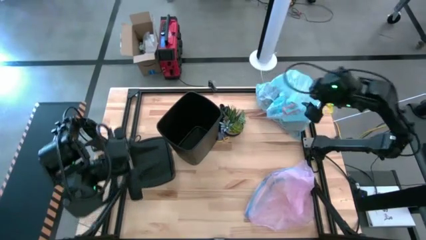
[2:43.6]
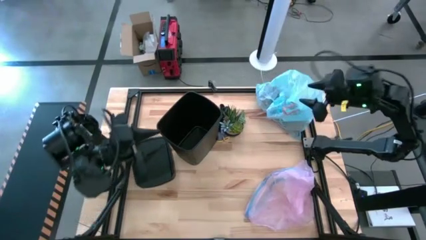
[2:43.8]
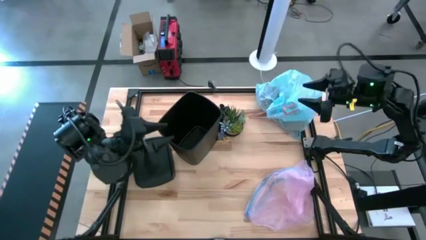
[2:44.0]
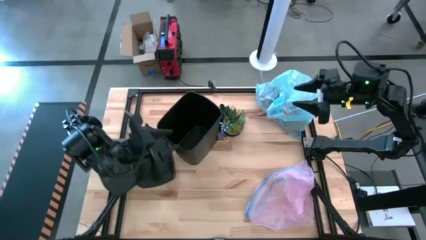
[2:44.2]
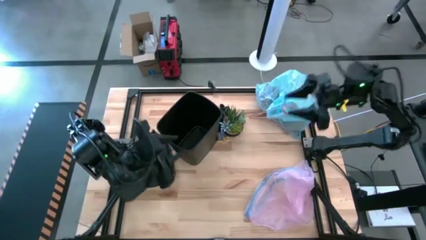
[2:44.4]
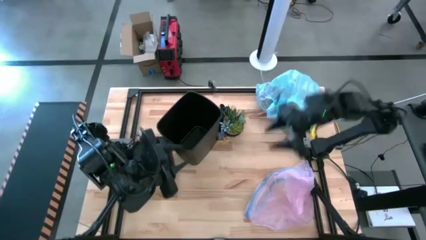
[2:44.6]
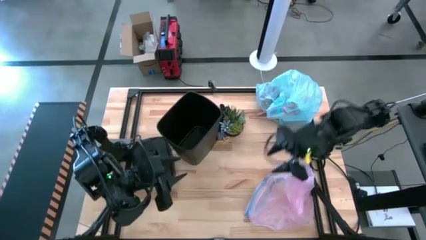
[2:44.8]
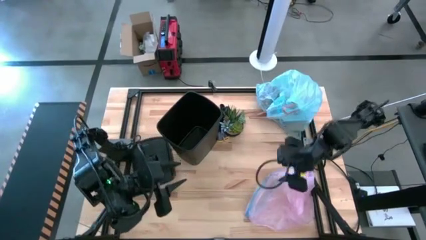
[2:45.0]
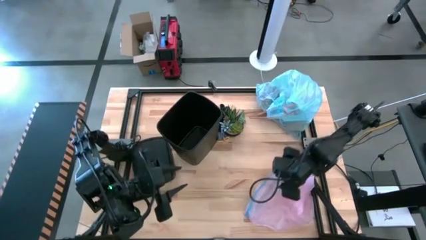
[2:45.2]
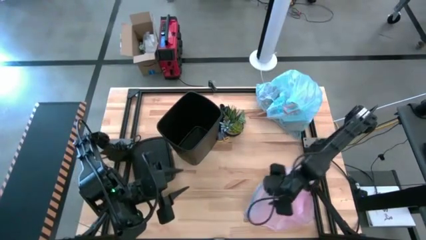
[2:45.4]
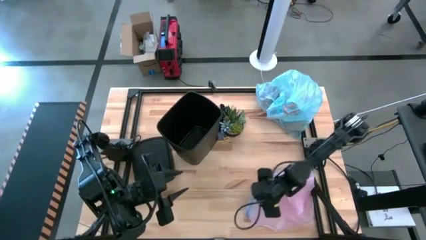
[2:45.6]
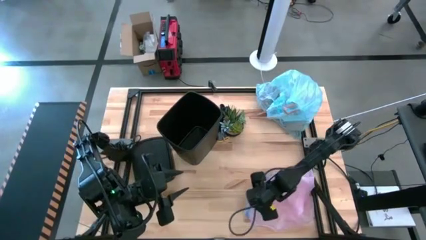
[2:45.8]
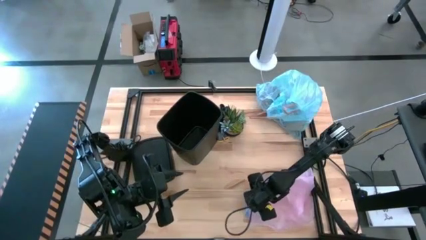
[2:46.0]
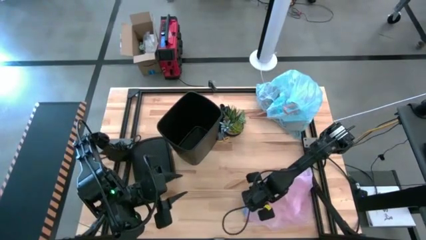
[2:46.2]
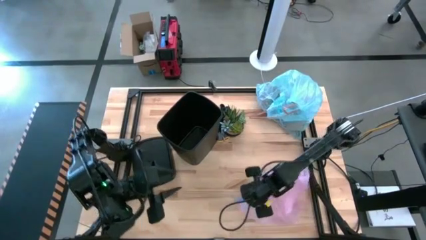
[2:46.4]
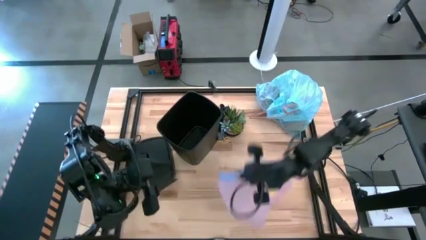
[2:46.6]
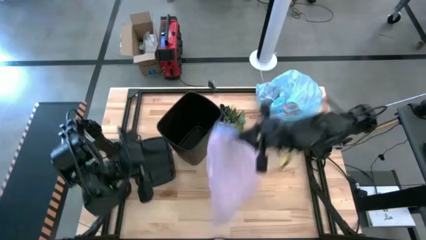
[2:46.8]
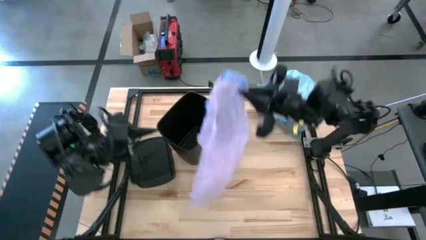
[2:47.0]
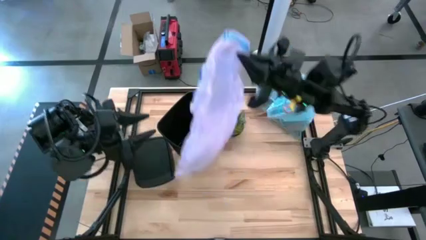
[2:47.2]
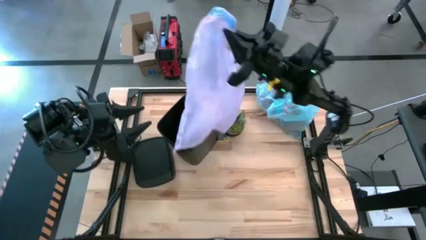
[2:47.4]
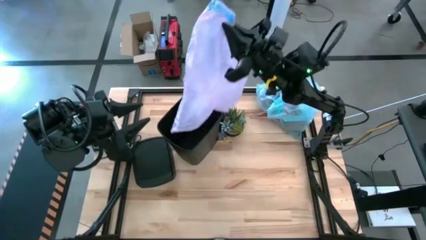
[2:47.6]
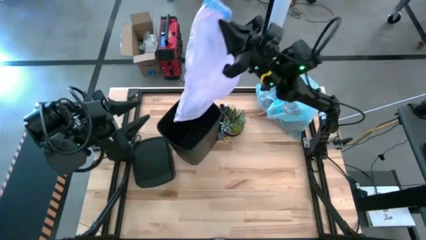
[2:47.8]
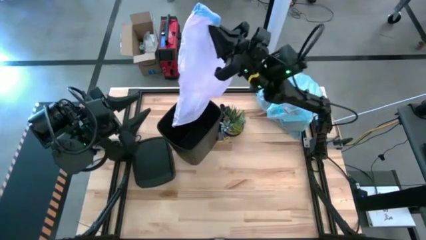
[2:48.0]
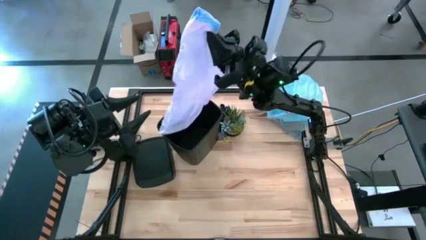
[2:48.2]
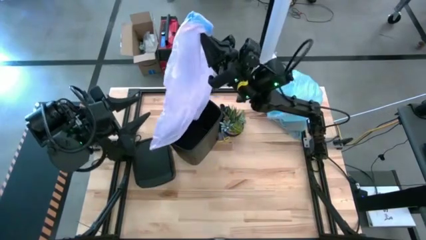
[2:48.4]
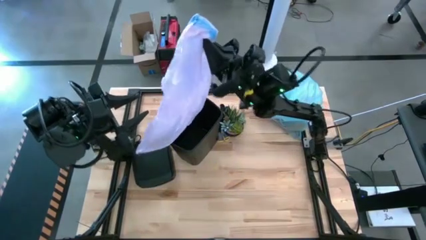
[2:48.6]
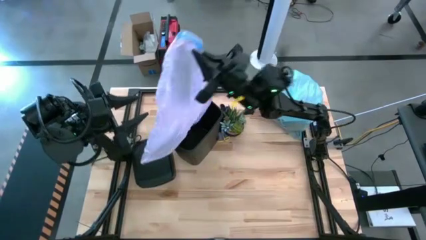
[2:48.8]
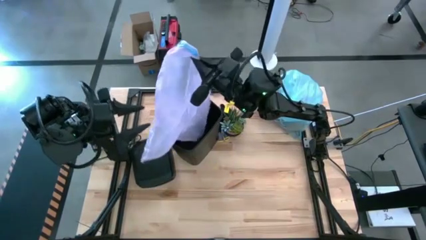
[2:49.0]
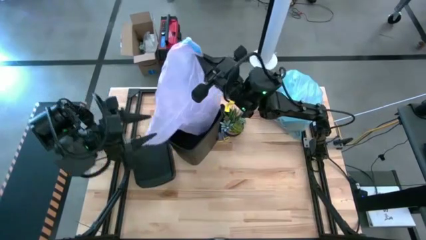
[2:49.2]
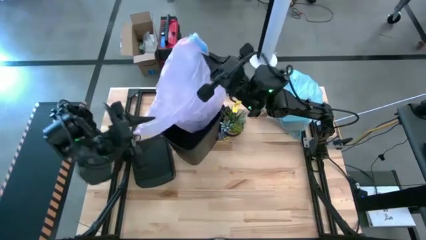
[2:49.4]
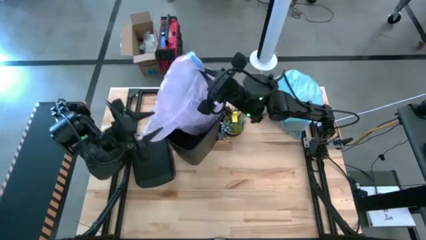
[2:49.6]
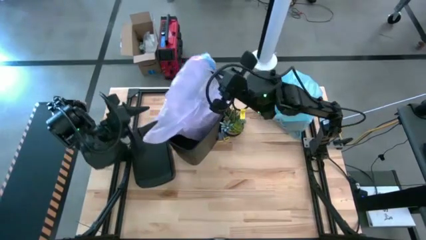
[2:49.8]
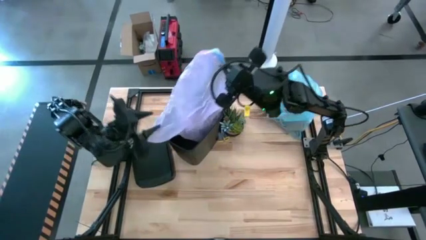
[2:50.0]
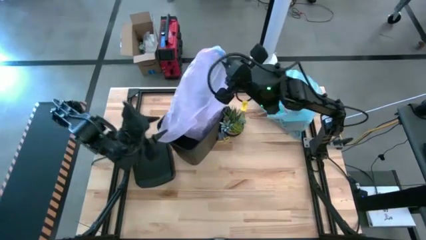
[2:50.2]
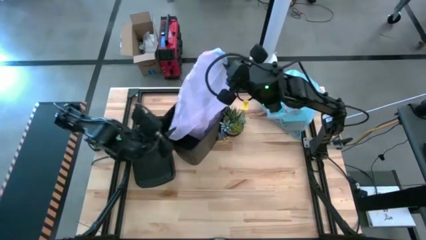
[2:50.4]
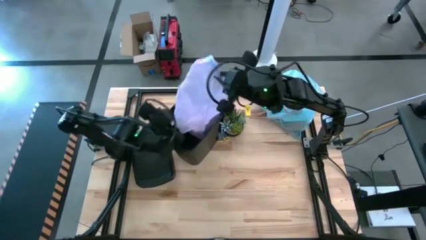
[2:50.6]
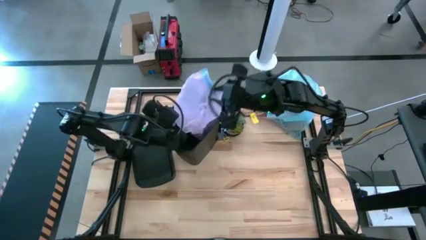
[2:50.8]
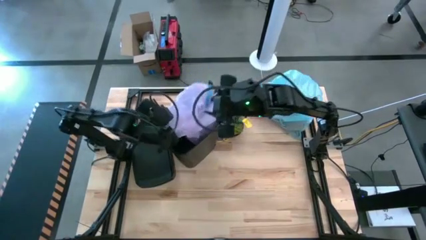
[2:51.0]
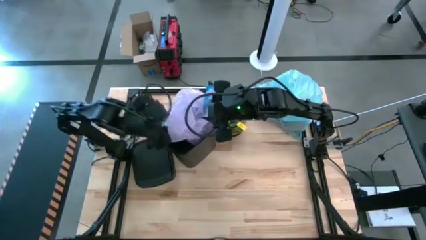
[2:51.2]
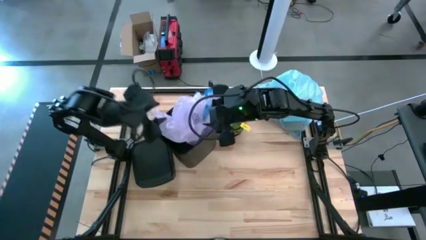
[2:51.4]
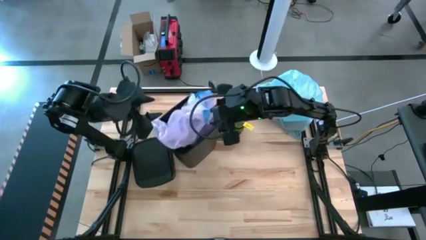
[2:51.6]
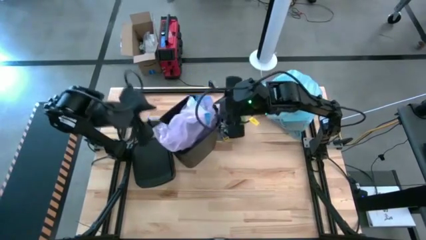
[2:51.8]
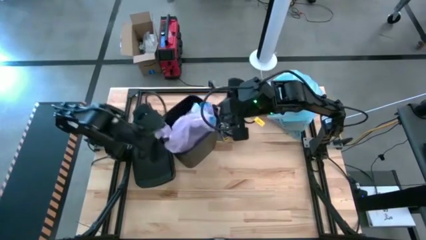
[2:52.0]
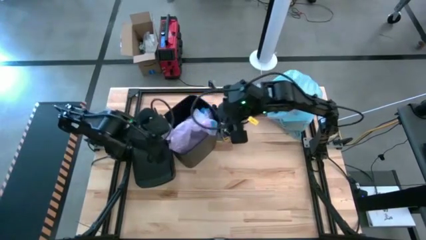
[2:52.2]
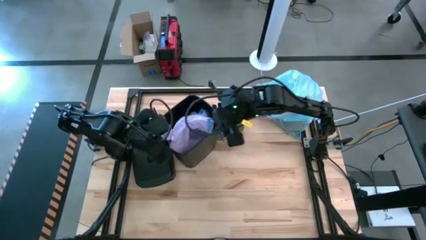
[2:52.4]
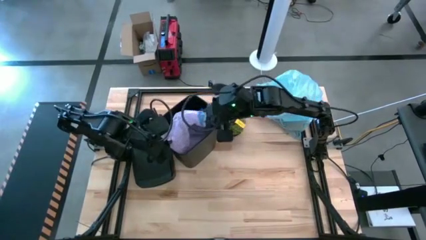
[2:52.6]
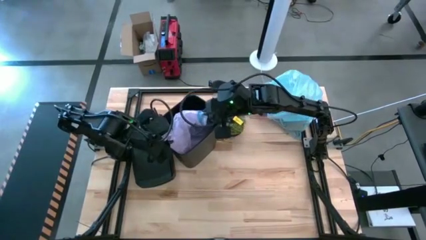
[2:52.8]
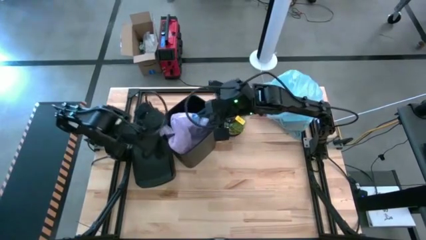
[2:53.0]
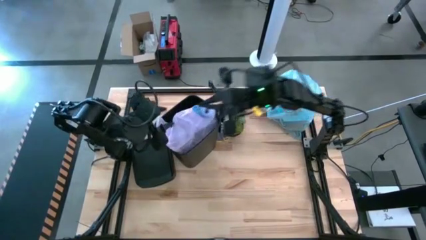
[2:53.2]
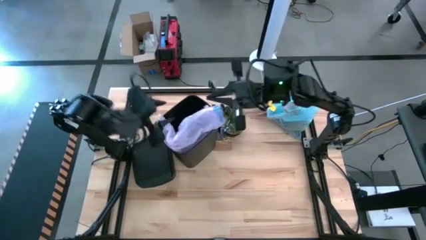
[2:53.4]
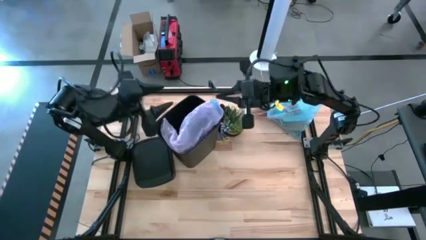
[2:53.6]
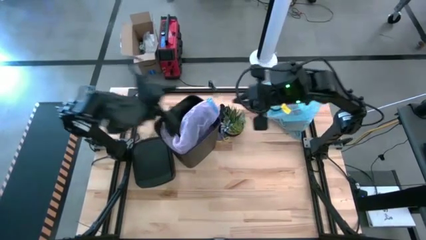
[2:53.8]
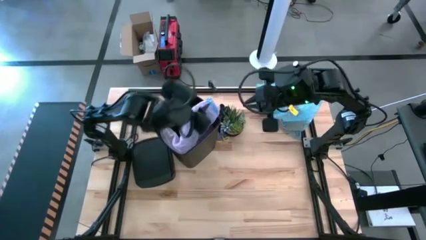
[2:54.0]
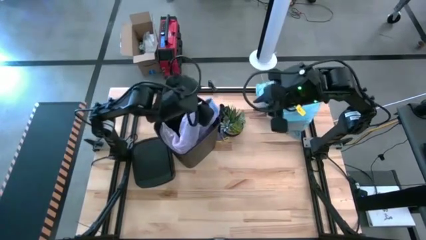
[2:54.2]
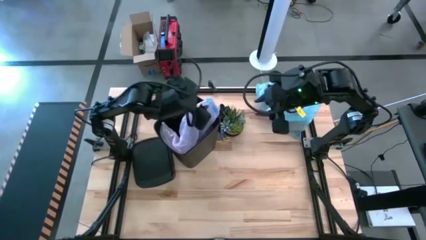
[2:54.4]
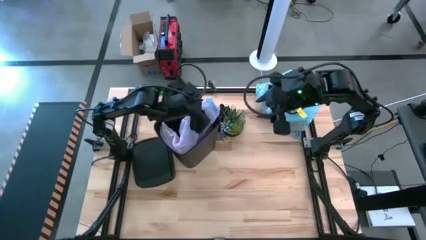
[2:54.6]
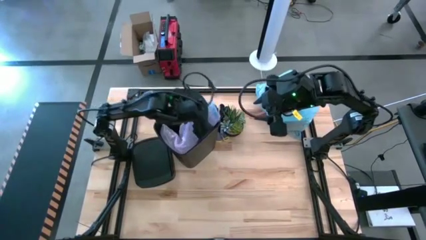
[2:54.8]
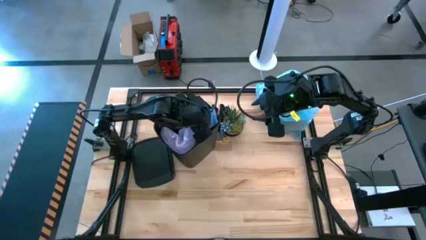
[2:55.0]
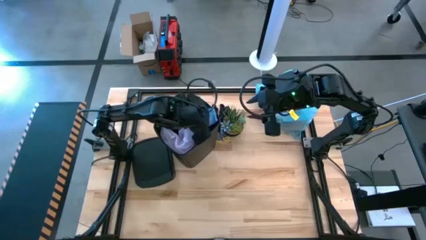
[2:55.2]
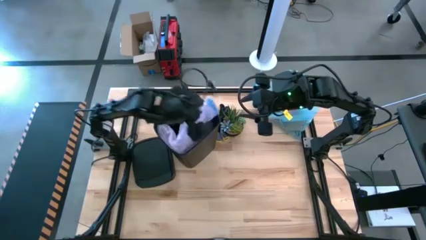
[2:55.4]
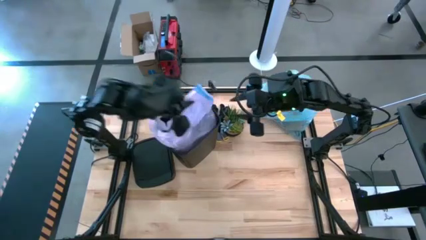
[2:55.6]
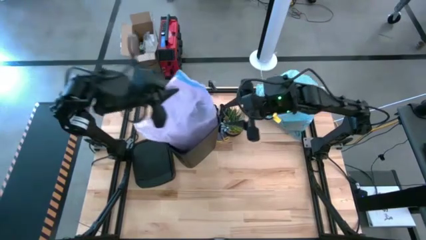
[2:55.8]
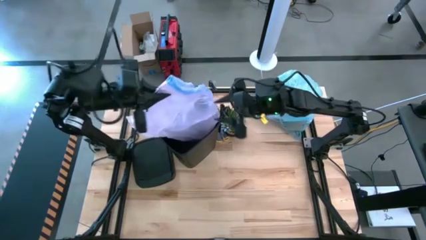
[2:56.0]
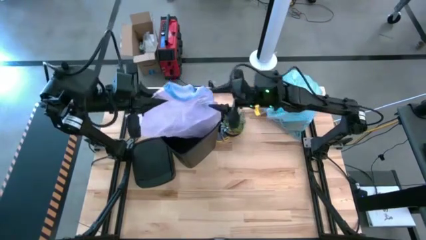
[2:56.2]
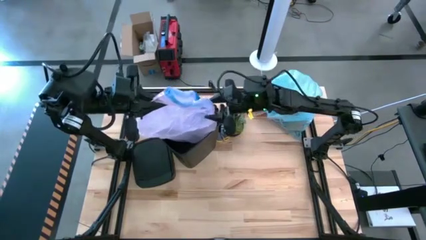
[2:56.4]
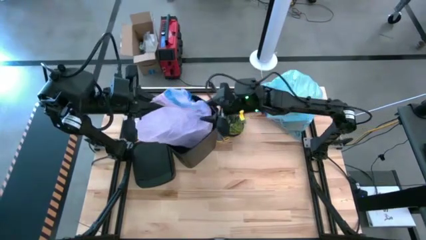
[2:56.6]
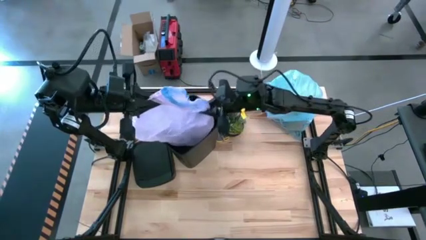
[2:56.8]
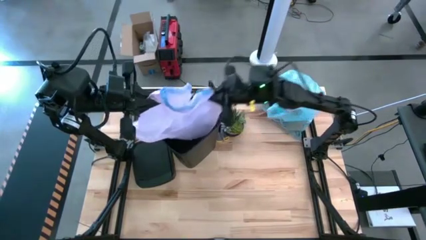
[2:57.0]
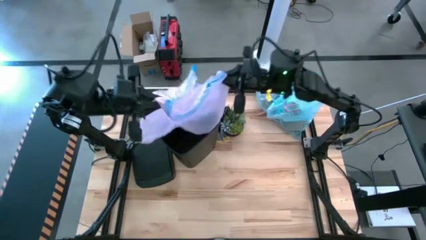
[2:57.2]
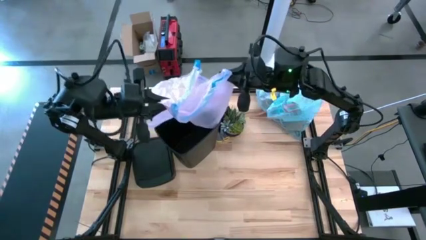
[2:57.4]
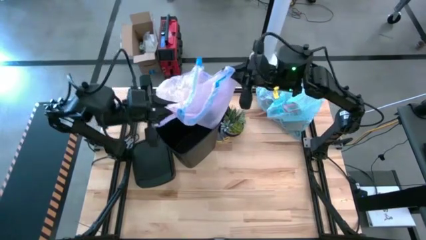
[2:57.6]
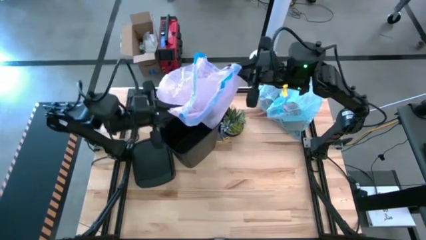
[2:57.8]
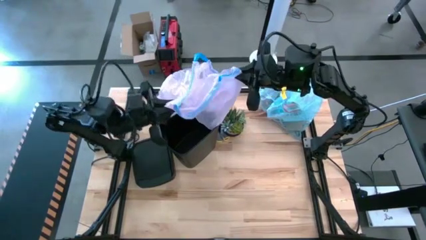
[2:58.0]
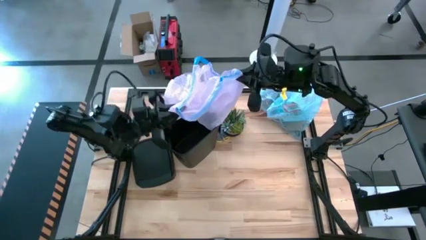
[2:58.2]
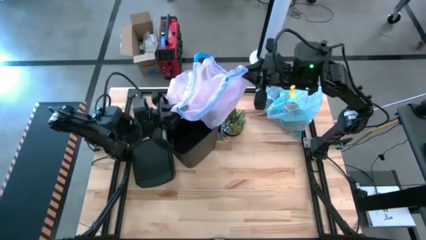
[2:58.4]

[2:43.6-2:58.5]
Task: place trash/remove bag and relplace
Insert a new pink trash bag into the trash bin

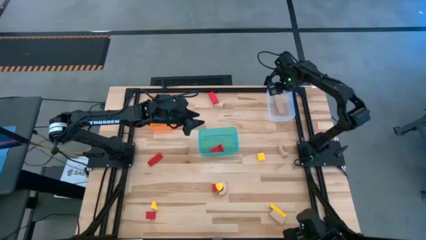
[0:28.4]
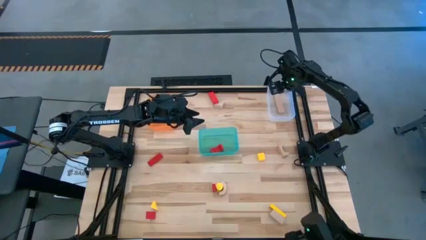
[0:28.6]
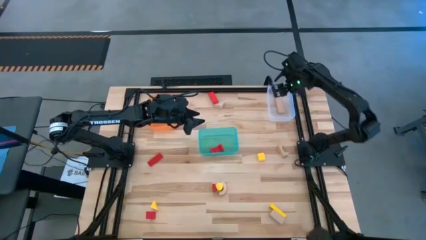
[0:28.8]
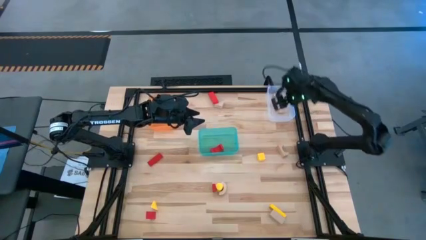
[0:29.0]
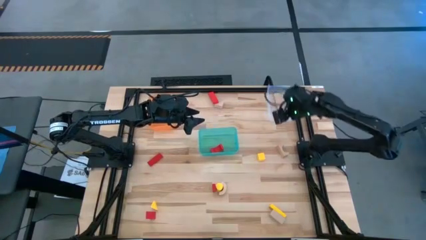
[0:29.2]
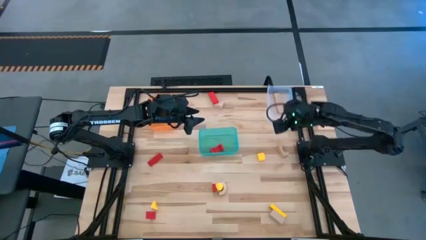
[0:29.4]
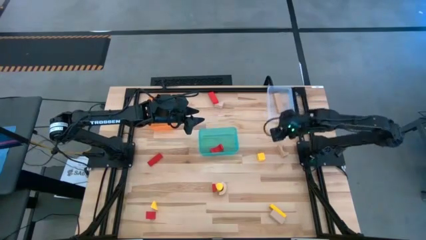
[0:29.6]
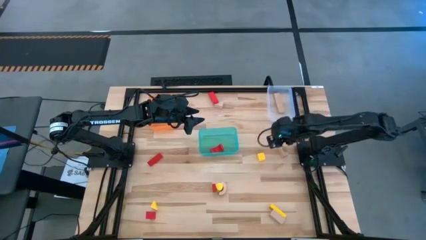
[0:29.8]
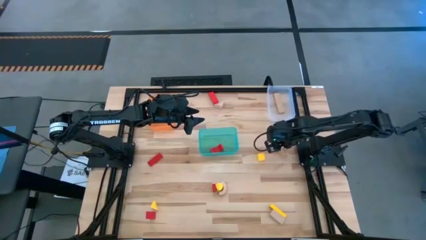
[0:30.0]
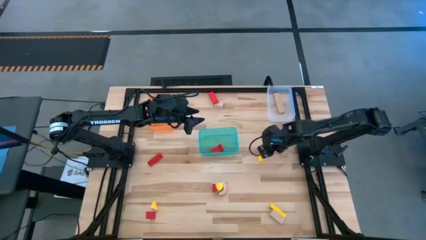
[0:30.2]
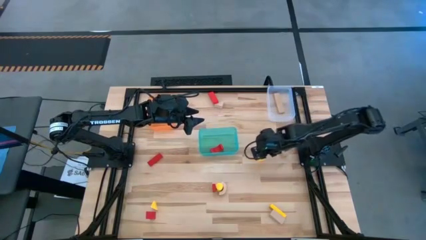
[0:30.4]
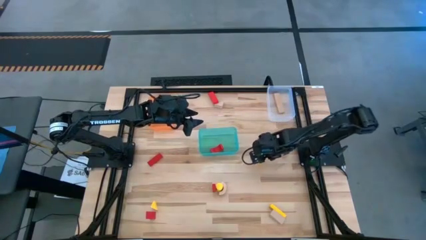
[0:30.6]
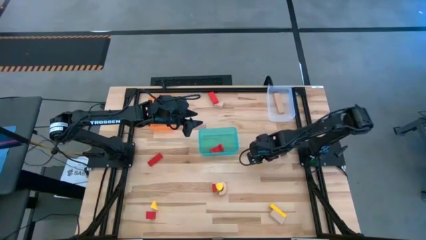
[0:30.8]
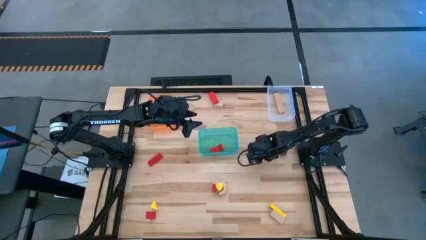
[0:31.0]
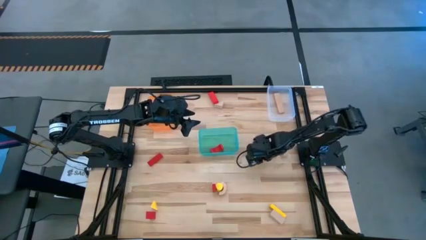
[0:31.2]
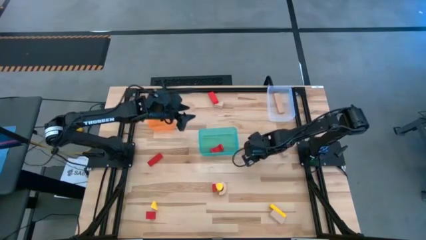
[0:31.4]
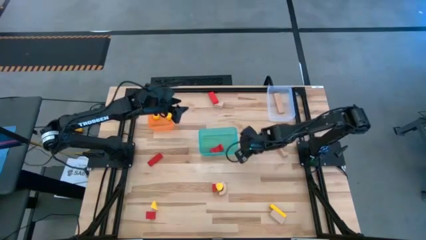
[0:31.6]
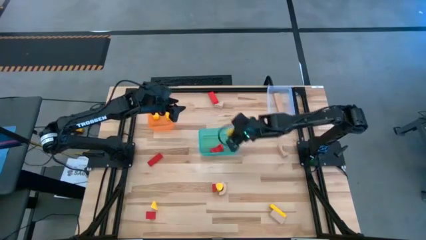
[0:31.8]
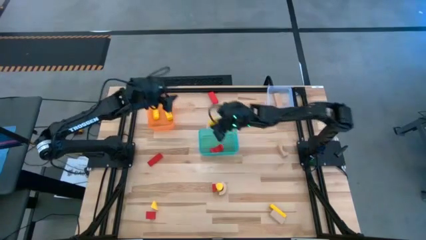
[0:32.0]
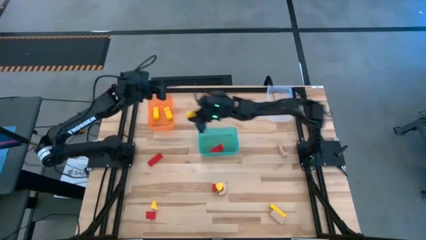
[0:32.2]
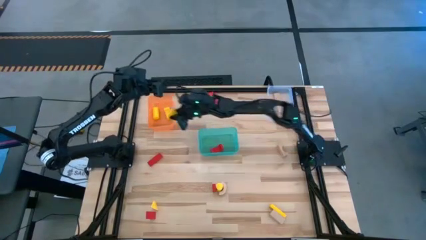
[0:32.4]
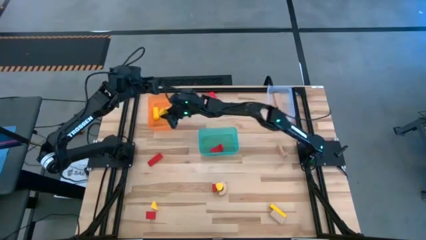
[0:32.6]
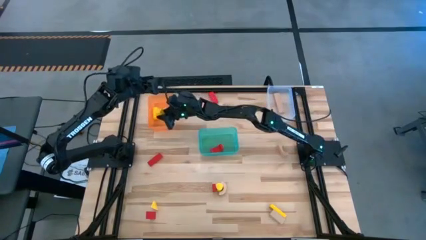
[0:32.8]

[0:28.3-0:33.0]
Task: Sort & place blocks by color
Put the yellow block into the orange bin
